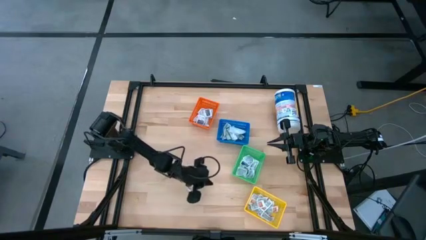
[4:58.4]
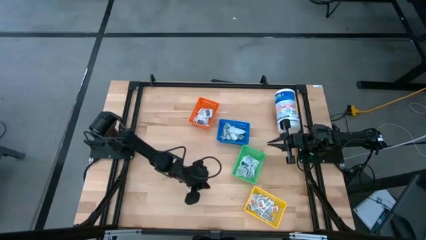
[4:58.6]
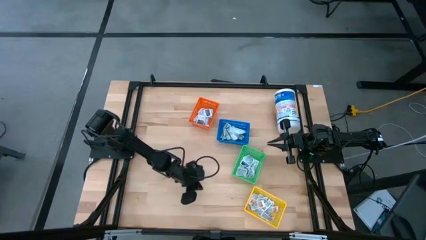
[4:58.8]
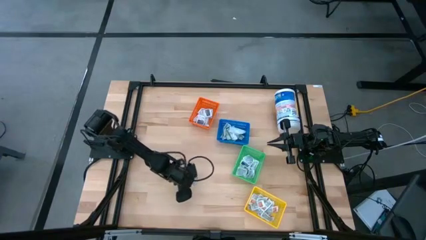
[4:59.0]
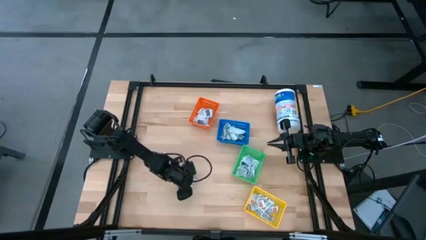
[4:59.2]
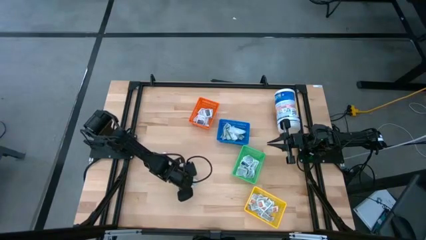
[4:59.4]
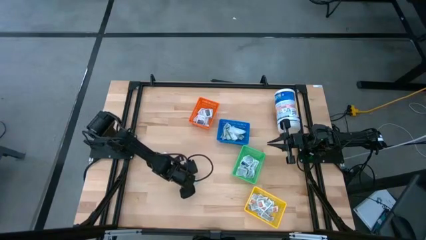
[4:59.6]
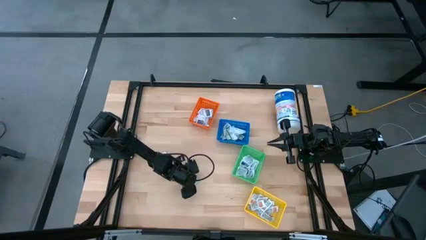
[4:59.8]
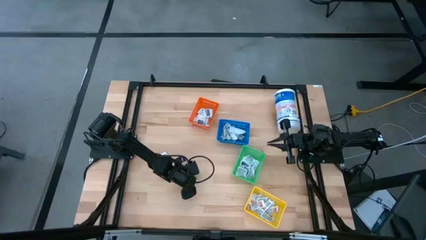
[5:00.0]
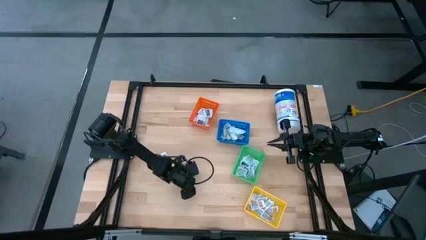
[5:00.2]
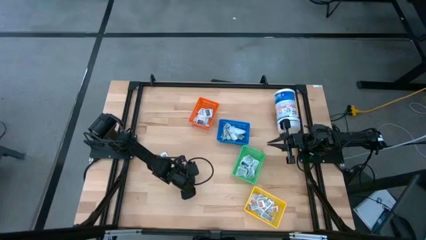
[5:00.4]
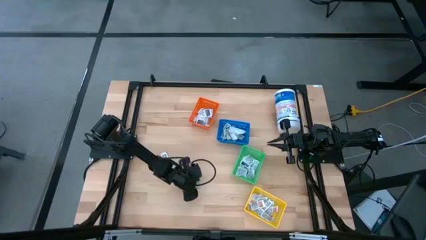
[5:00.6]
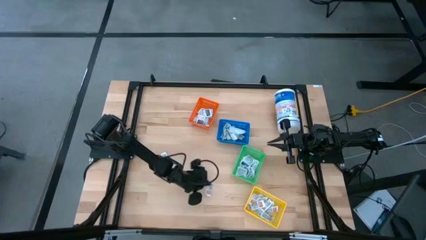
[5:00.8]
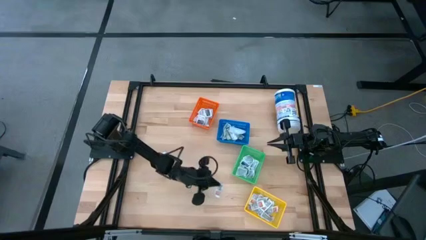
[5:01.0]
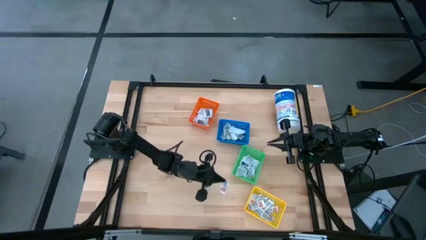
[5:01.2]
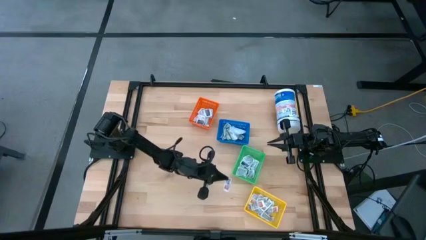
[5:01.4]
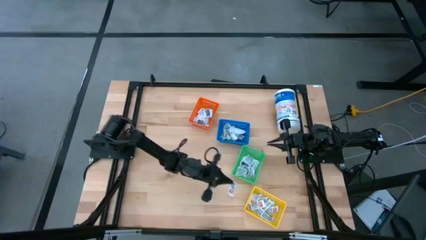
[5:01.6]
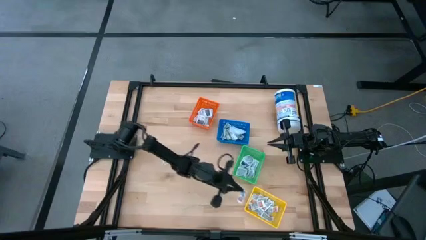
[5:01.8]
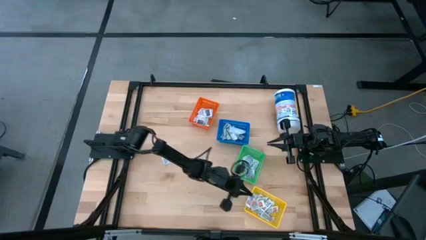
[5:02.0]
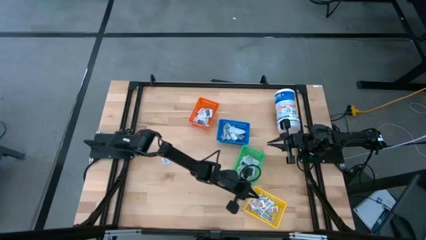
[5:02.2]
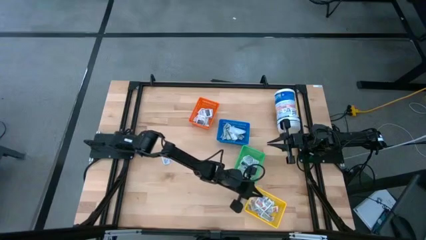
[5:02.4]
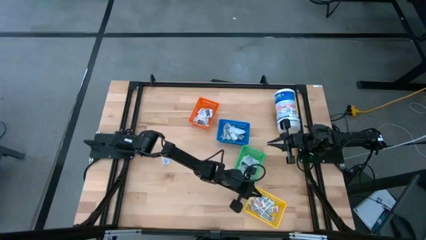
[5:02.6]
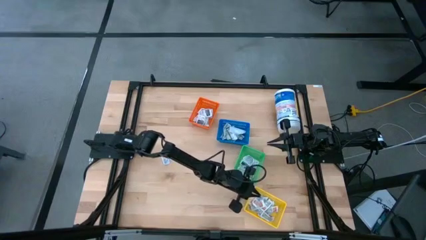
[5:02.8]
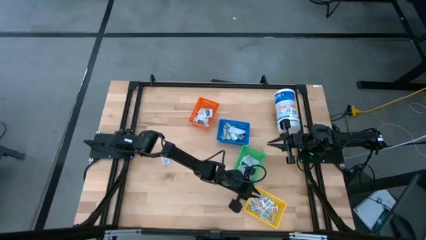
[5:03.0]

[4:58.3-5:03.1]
Task: Pick & Place First Aid Supplies
Put the orange ointment pack into the yellow basket

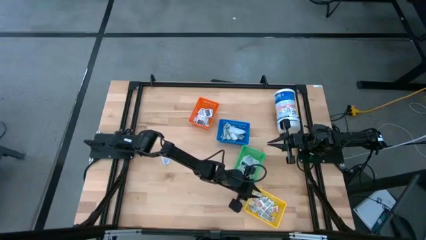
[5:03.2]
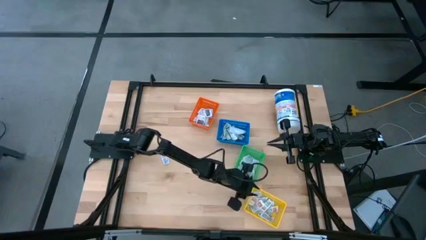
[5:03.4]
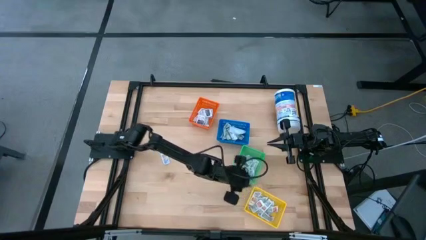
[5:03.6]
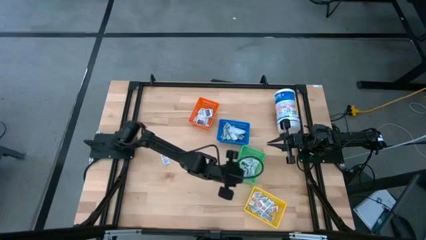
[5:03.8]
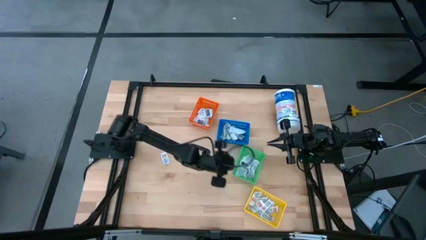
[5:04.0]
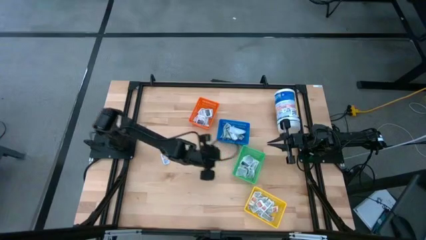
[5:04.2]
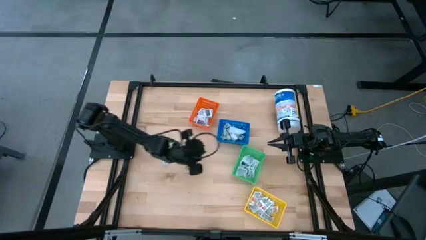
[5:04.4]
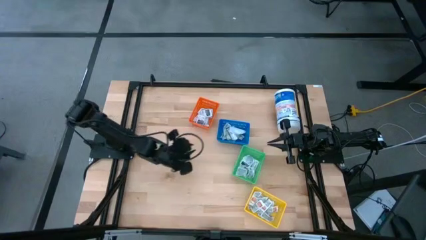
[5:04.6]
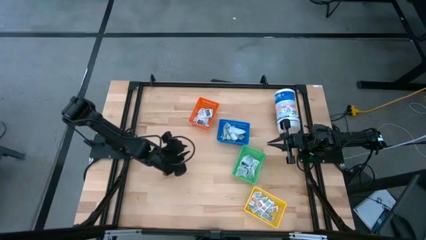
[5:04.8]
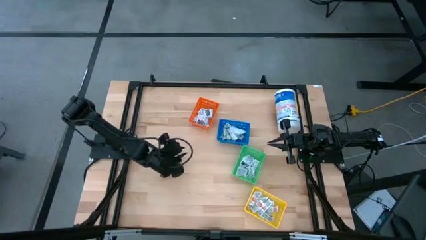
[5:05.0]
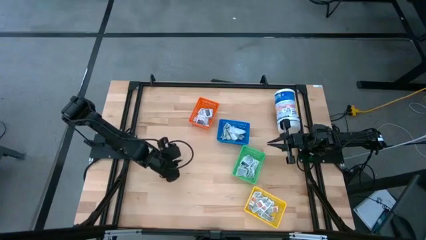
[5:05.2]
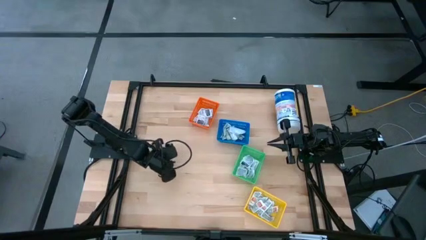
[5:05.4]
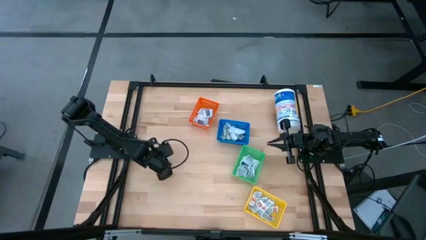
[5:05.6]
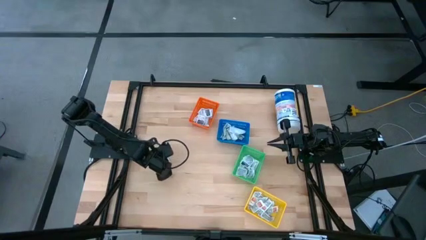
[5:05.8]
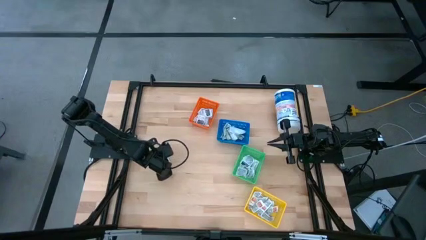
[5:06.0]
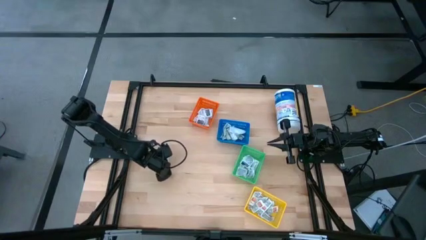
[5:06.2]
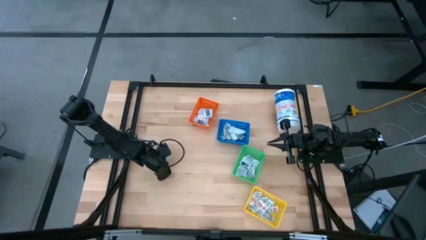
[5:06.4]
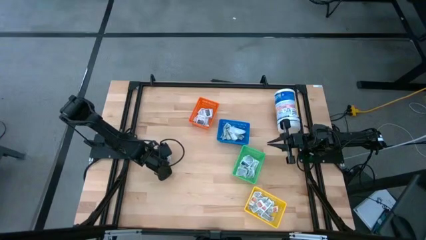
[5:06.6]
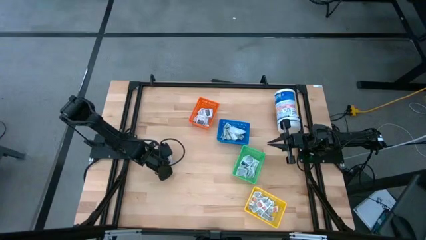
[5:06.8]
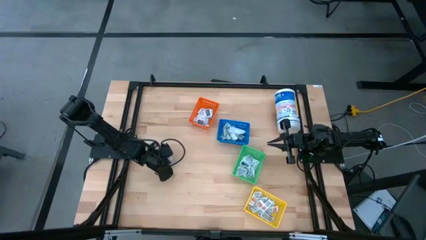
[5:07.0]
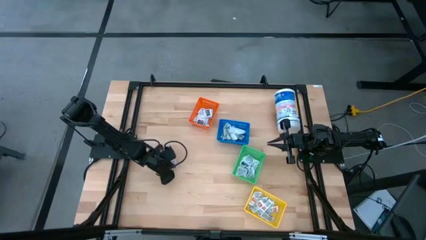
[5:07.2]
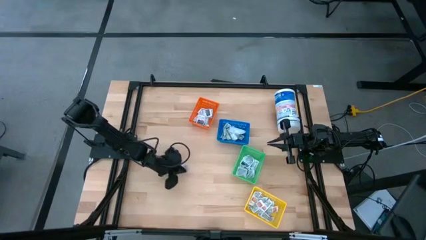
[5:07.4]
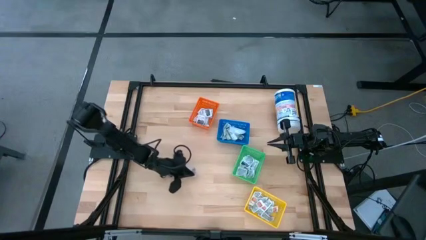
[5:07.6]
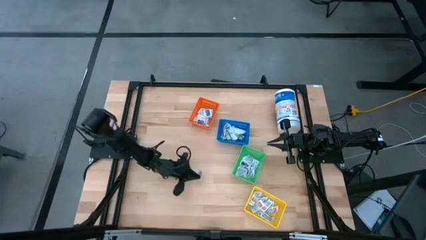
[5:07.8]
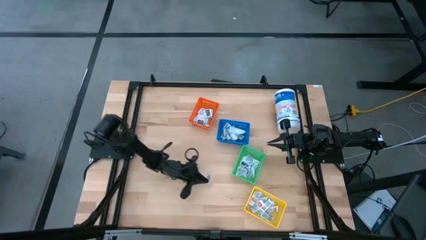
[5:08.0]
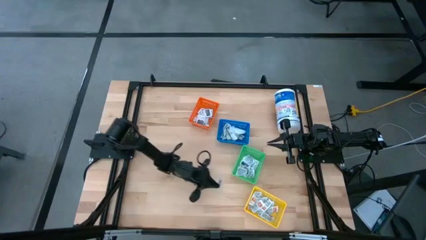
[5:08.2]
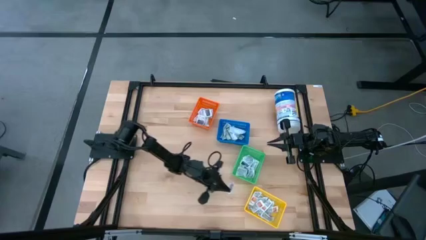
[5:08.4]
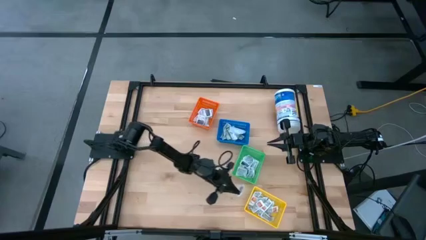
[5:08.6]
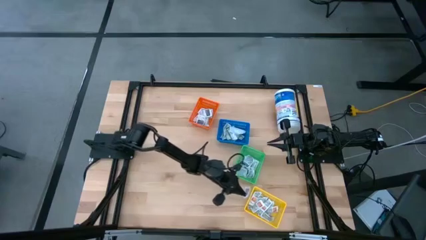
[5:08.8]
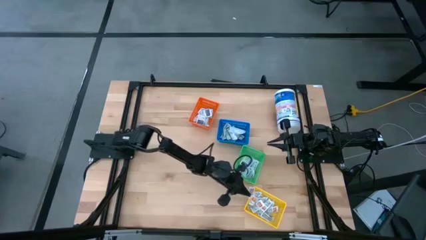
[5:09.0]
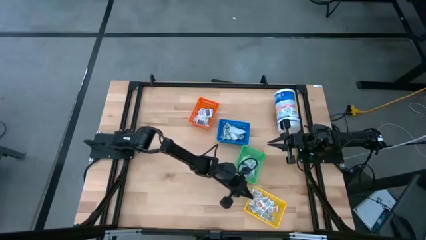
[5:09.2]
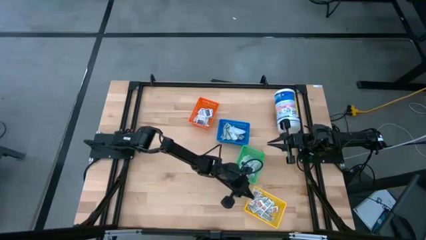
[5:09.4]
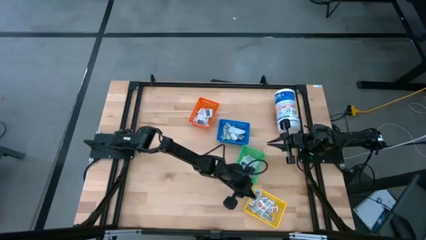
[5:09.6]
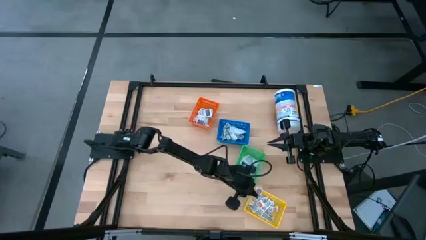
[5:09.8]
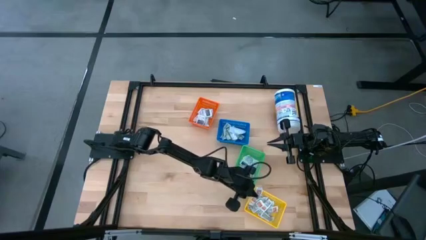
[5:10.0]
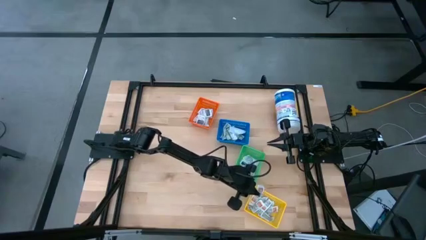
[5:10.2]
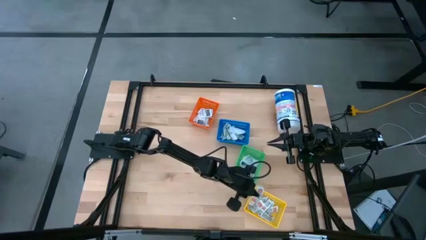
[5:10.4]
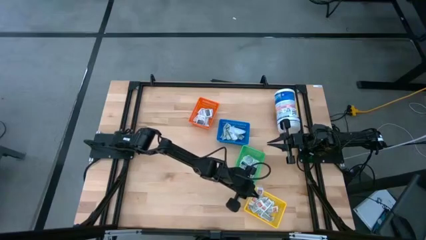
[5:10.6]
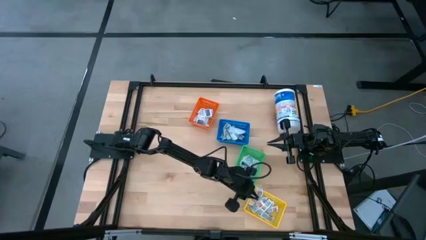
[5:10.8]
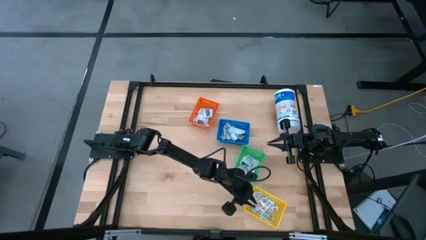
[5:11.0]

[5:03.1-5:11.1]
Put the orange ointment pack into the yellow basket

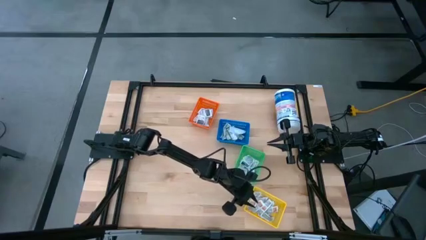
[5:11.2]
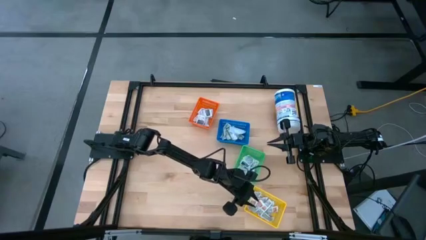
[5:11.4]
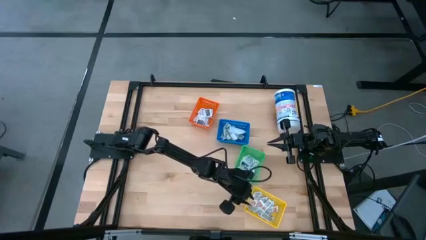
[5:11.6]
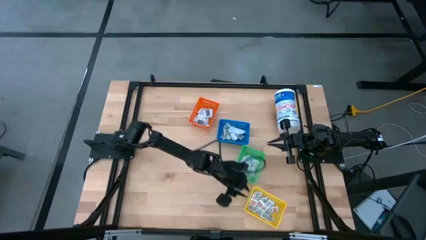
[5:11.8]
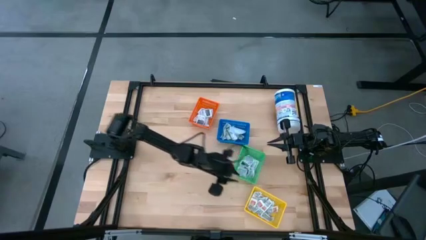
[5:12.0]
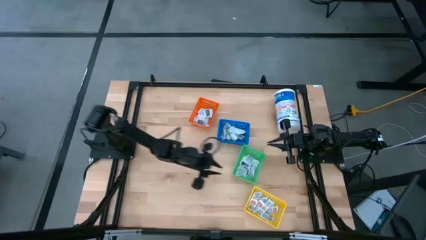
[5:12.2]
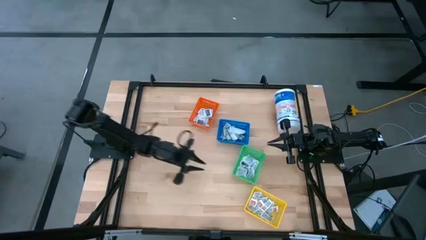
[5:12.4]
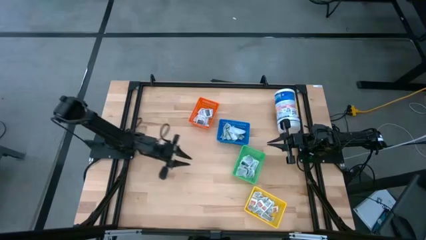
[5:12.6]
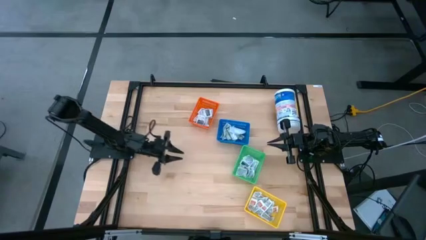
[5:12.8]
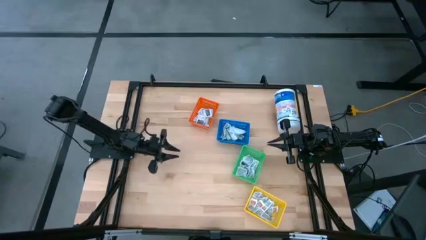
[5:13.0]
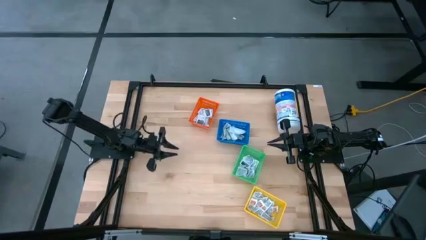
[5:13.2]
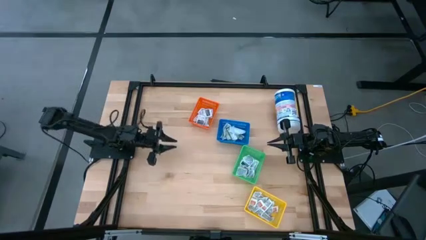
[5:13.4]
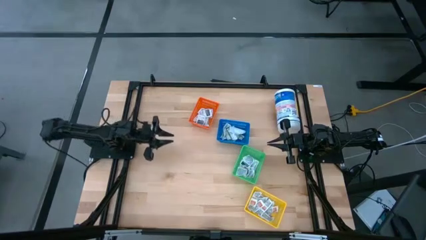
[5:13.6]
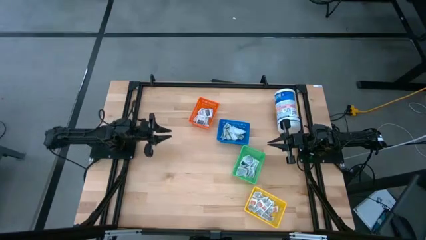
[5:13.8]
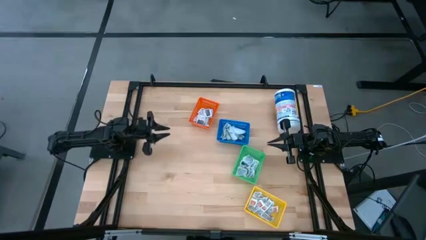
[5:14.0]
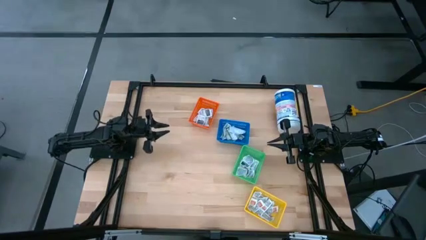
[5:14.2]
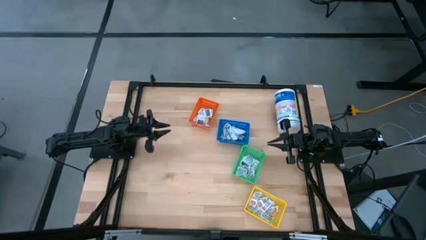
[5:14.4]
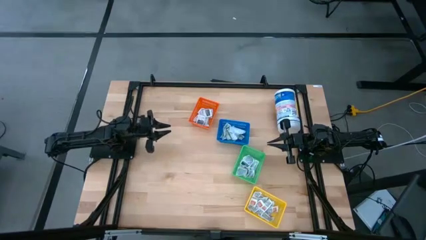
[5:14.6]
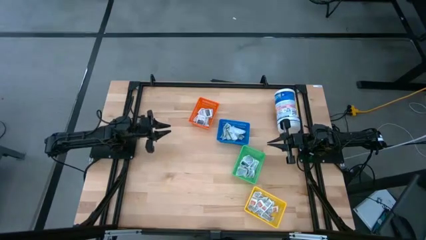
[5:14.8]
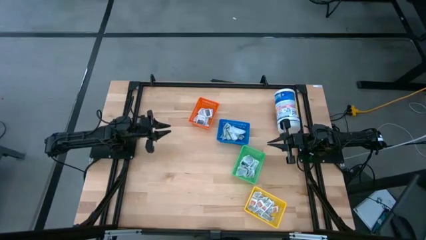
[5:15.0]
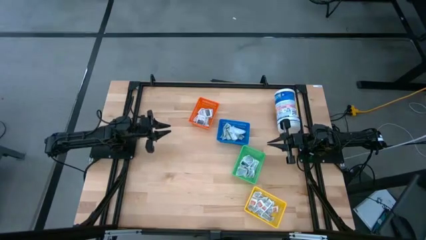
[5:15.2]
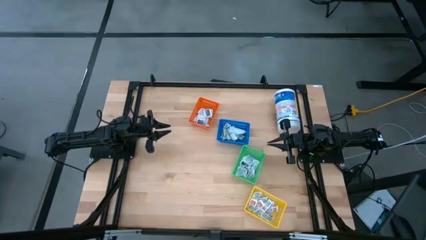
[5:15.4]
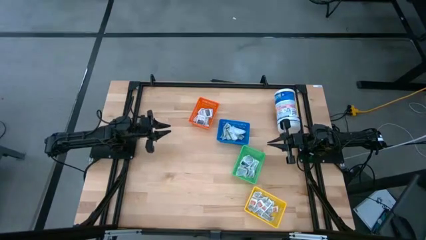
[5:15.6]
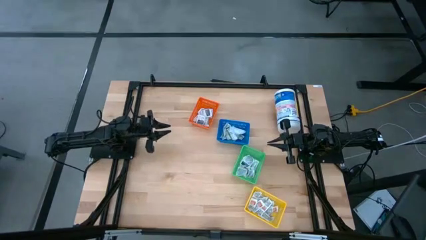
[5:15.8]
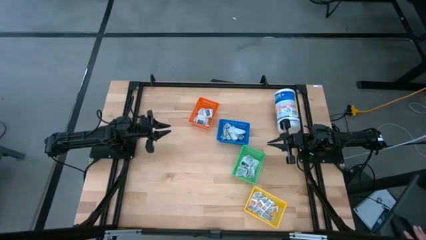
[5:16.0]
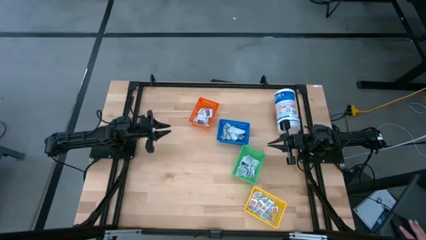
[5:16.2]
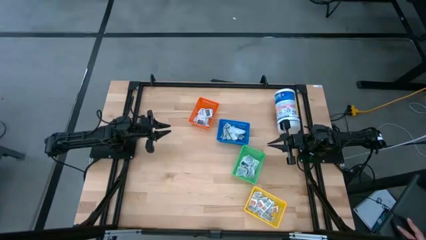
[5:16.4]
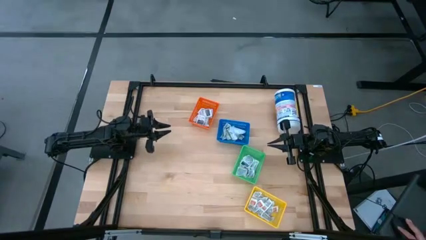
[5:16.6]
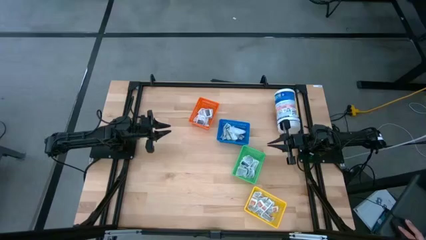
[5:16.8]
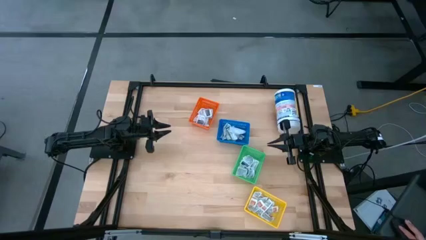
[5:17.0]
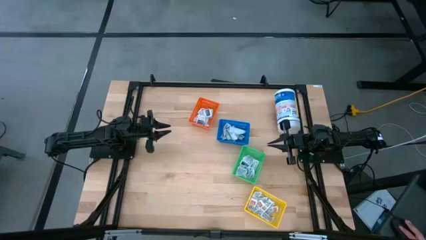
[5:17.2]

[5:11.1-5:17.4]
Return to Home Position
